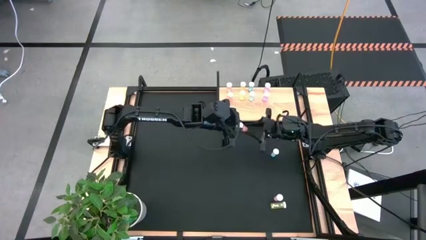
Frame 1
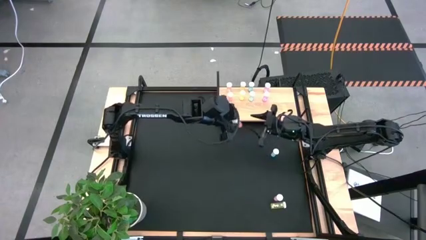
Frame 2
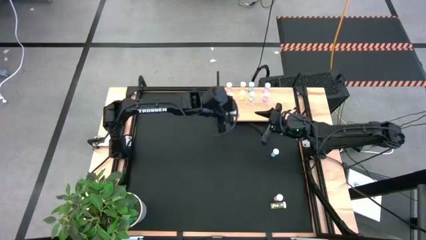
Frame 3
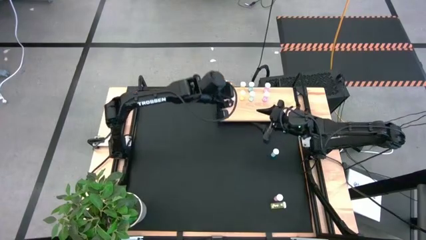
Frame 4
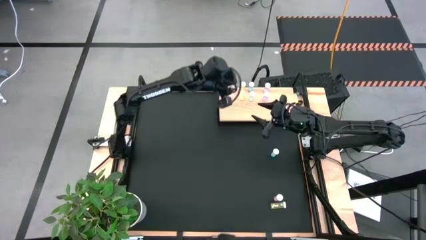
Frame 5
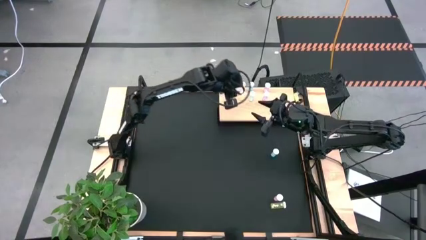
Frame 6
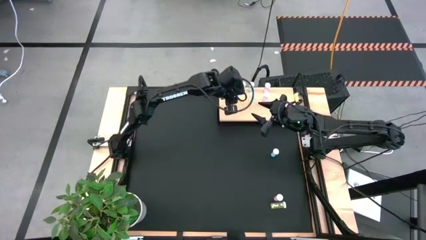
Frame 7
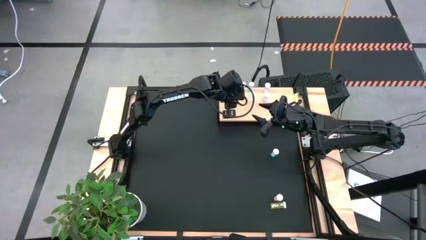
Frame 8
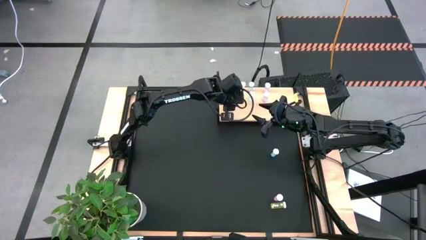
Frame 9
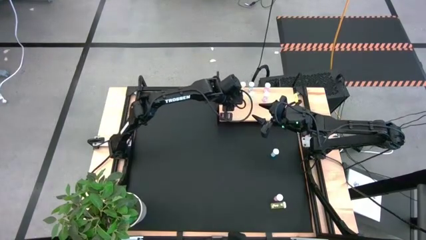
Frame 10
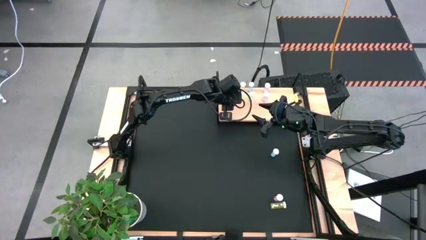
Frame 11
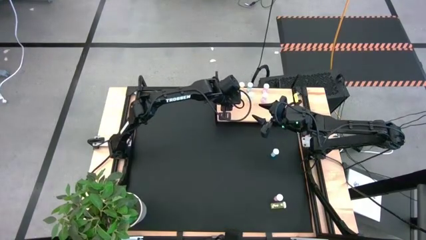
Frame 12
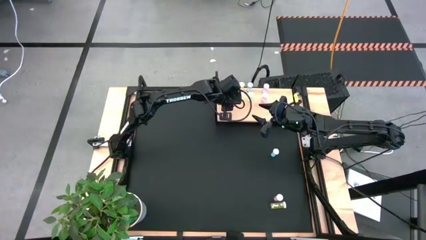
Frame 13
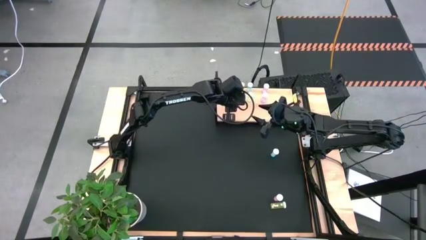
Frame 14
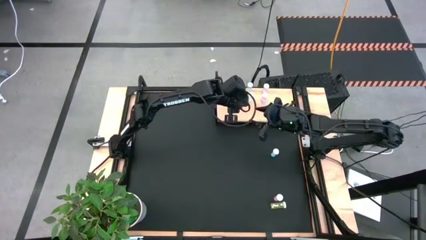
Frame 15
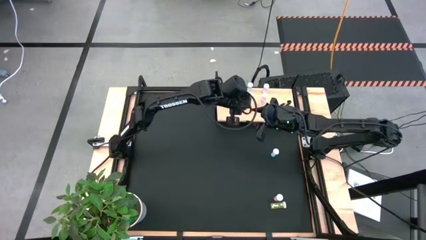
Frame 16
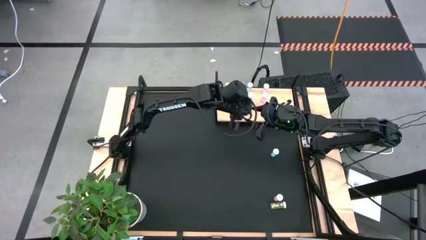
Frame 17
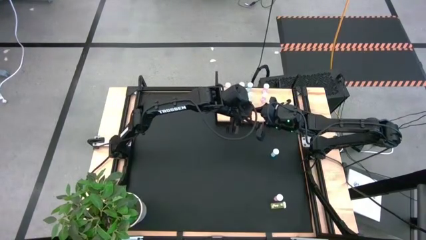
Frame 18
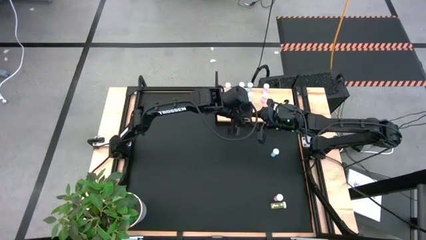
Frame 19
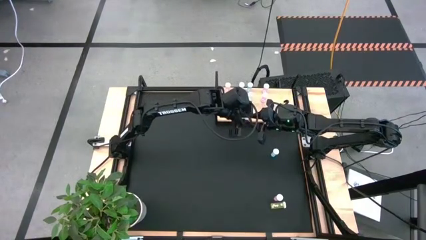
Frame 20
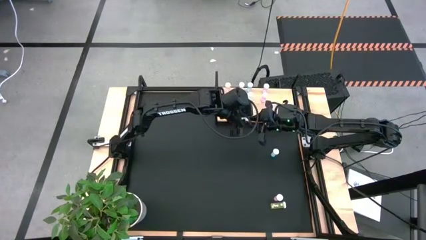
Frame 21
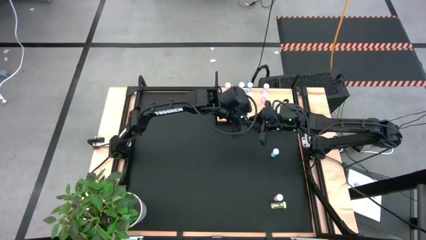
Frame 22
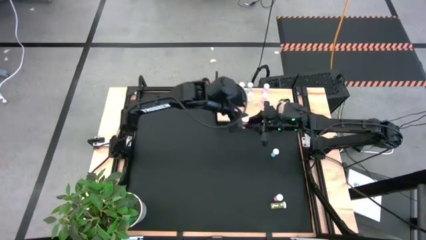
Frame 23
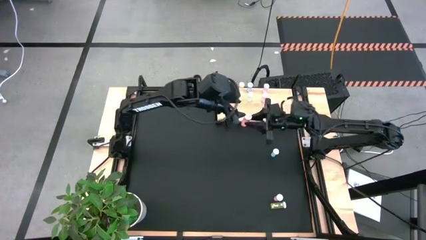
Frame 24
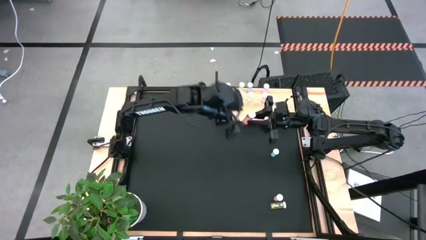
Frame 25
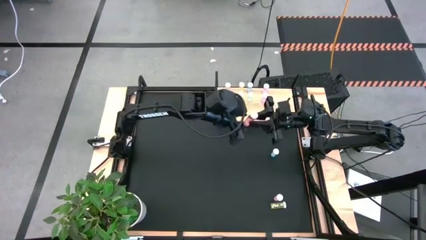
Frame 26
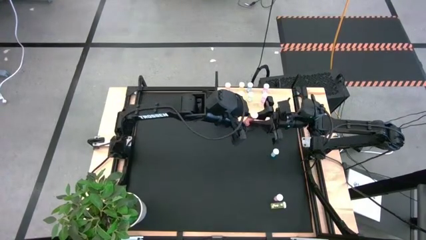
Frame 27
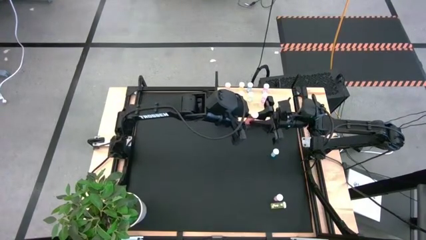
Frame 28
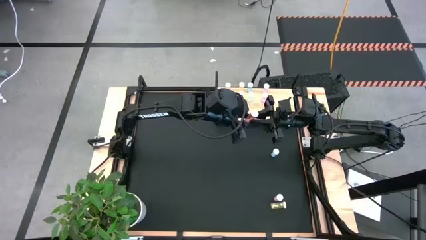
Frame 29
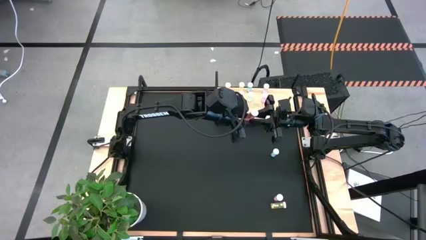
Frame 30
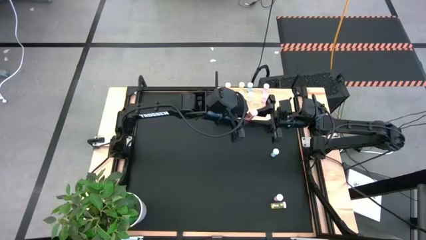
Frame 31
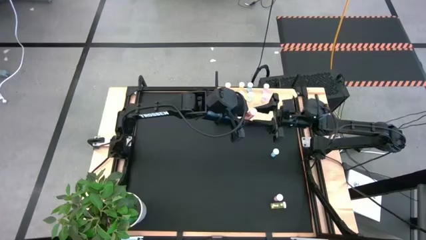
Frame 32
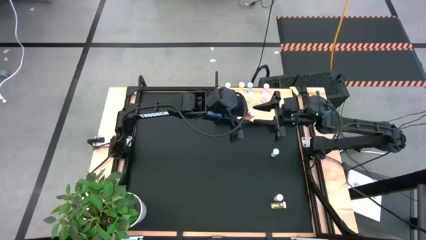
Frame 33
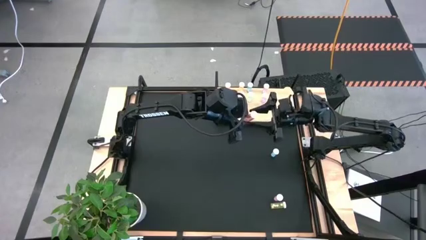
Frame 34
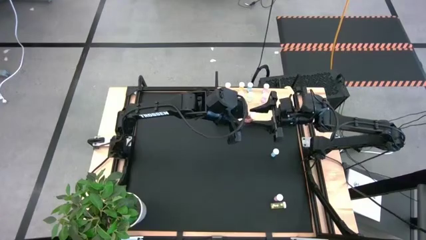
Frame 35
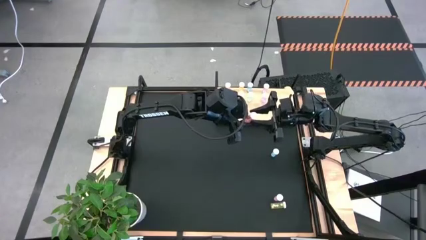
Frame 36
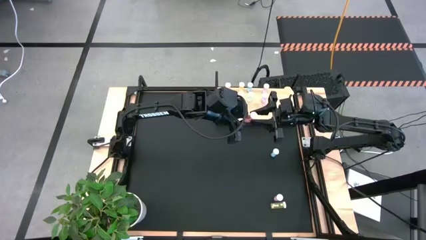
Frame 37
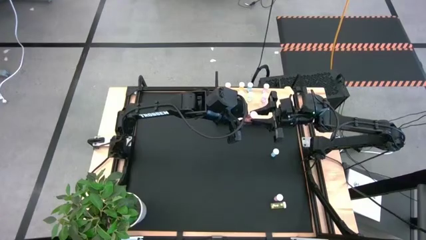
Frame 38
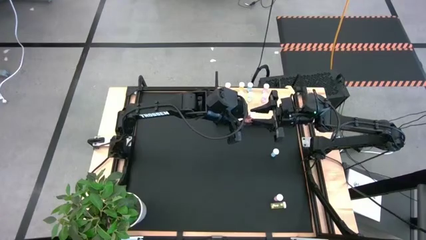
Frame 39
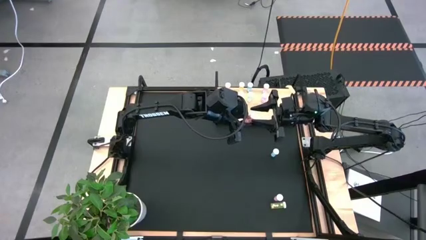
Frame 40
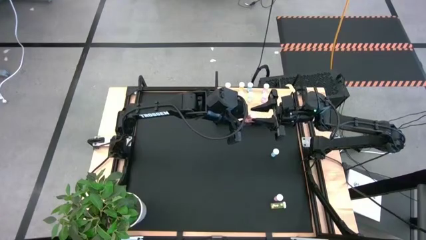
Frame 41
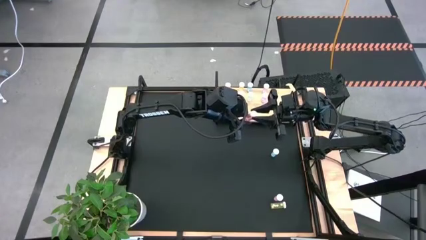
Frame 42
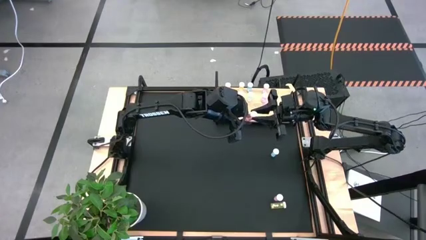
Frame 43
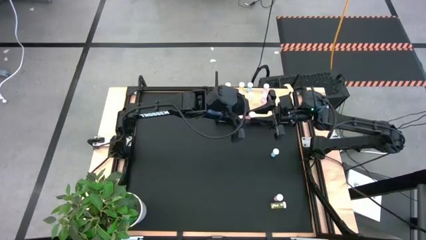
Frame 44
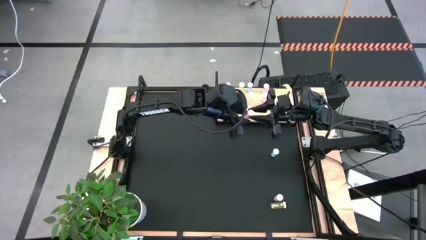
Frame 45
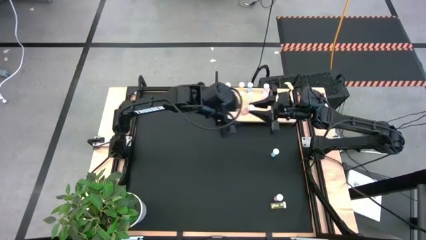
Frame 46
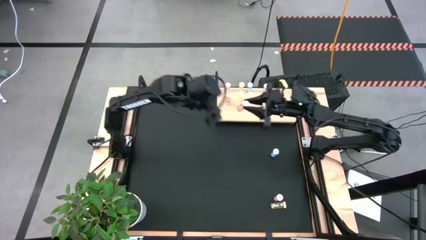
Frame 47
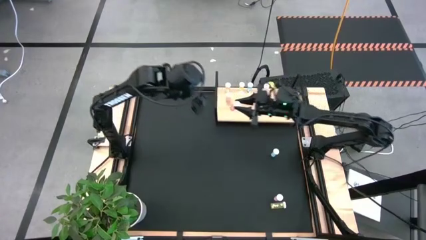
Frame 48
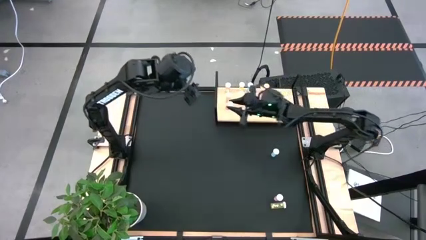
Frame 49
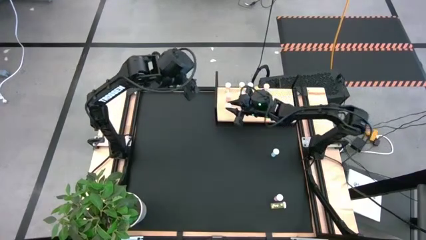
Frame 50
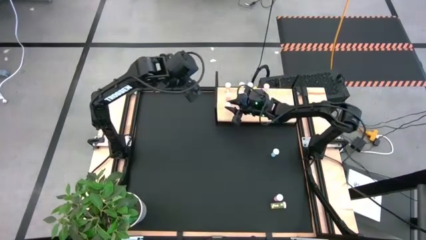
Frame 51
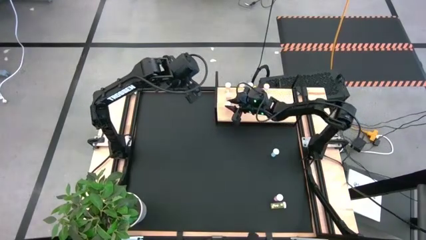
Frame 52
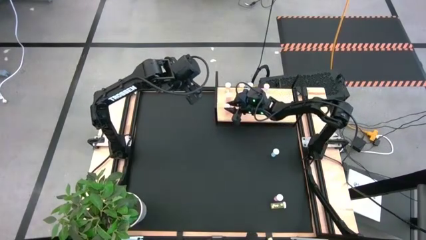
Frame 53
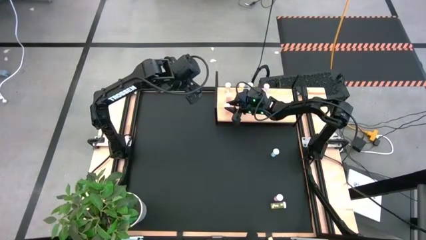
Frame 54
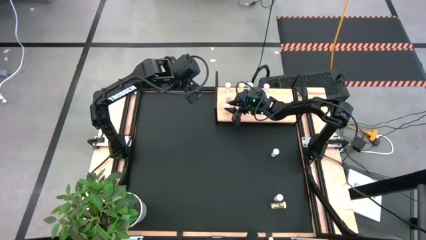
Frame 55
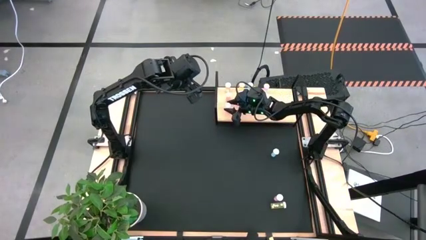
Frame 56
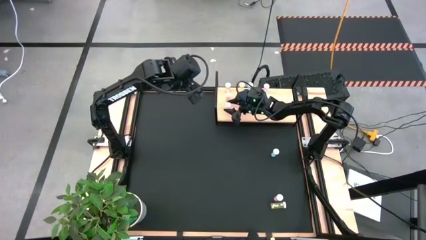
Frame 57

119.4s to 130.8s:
Task: Pick and place medicine bottles onto shelf by color
Put the pink pill bottle aligned with the other pink pill bottles on the shelf
